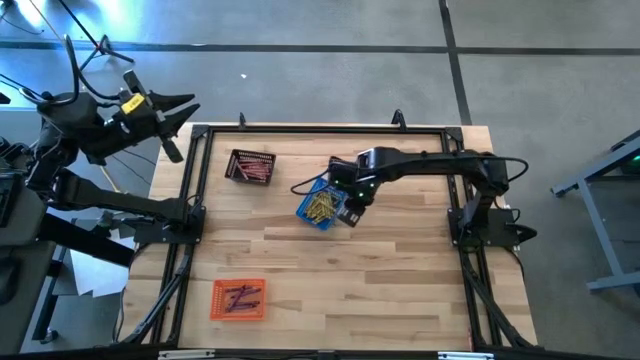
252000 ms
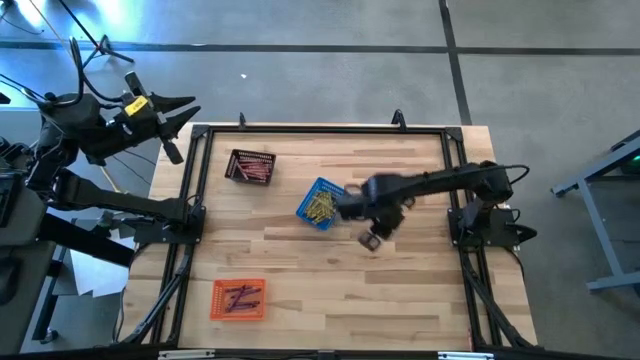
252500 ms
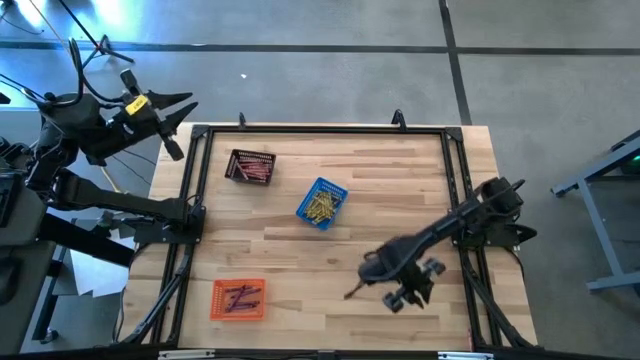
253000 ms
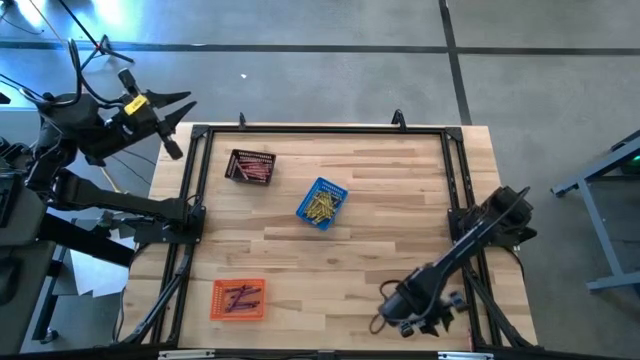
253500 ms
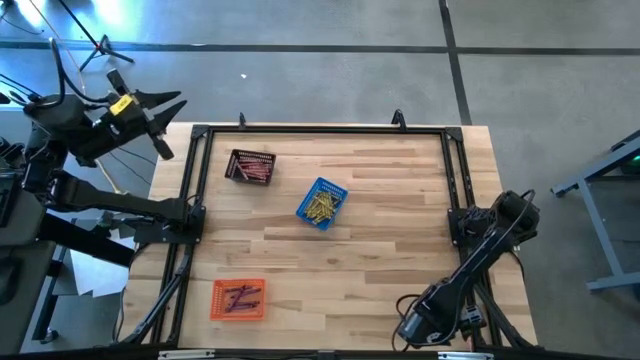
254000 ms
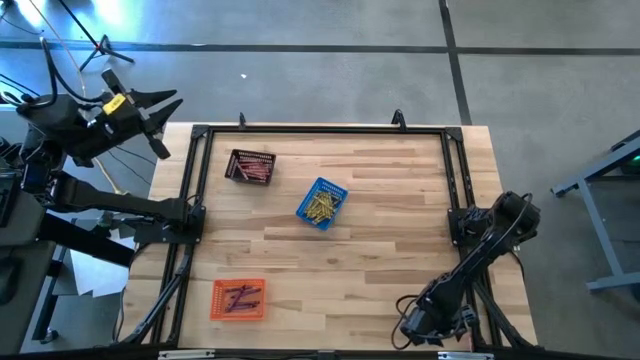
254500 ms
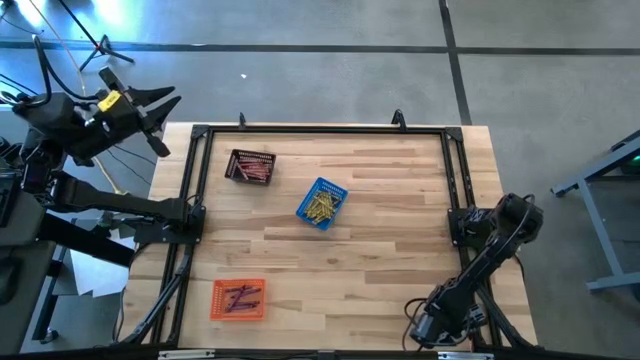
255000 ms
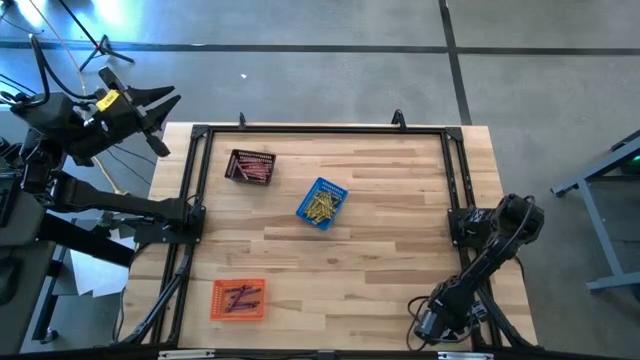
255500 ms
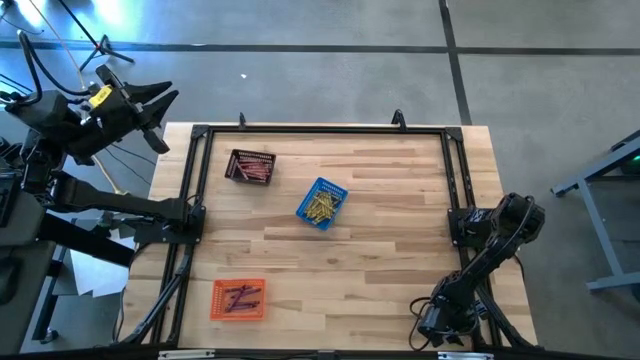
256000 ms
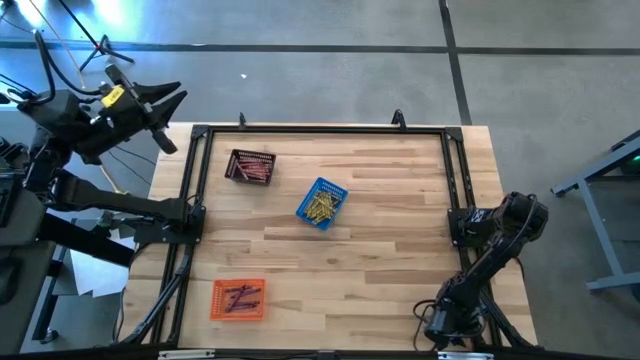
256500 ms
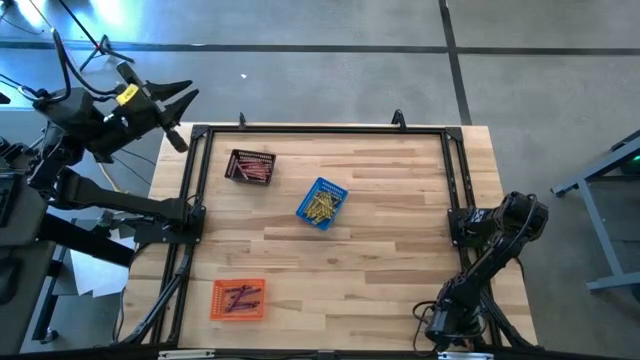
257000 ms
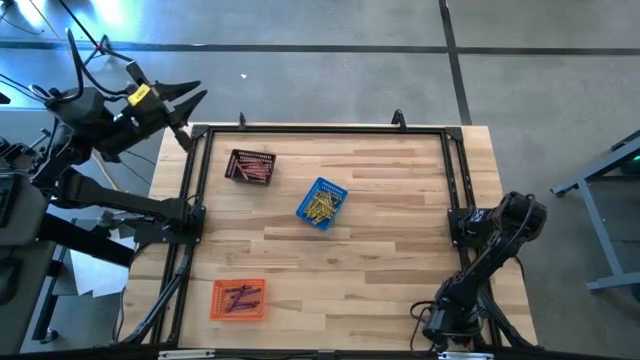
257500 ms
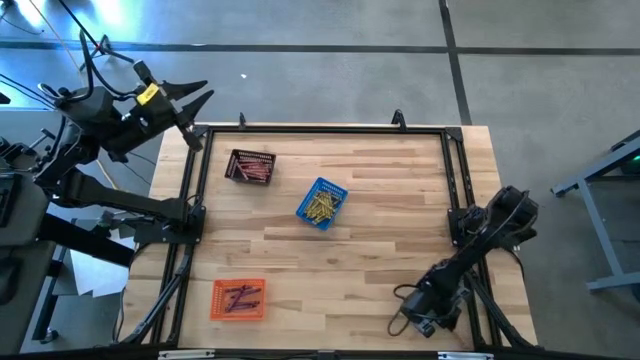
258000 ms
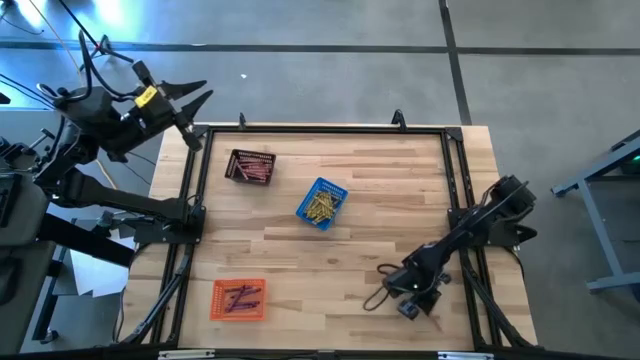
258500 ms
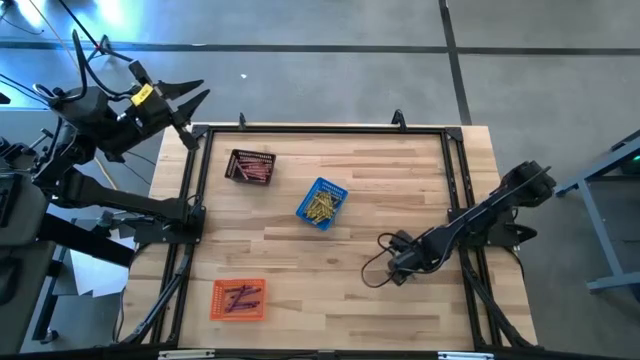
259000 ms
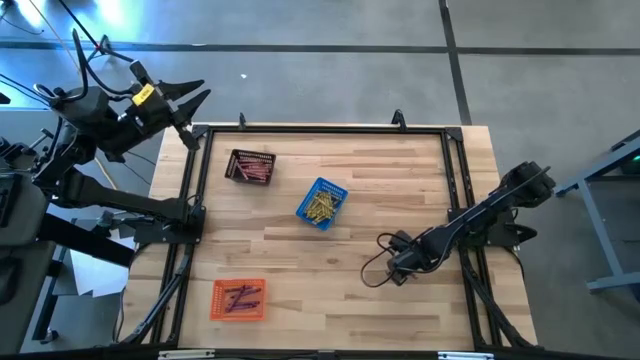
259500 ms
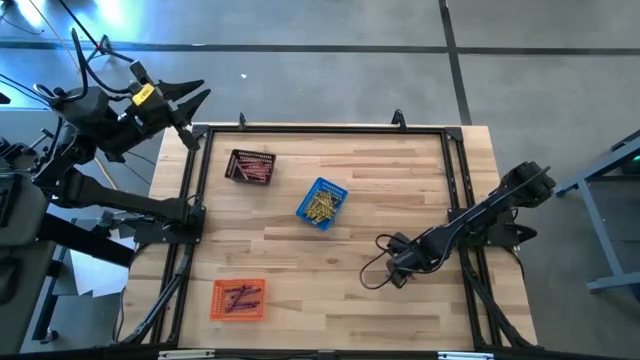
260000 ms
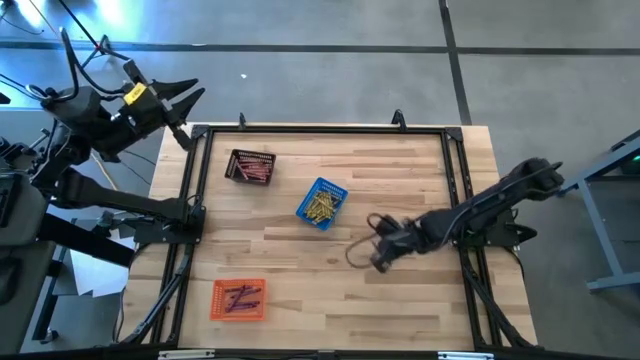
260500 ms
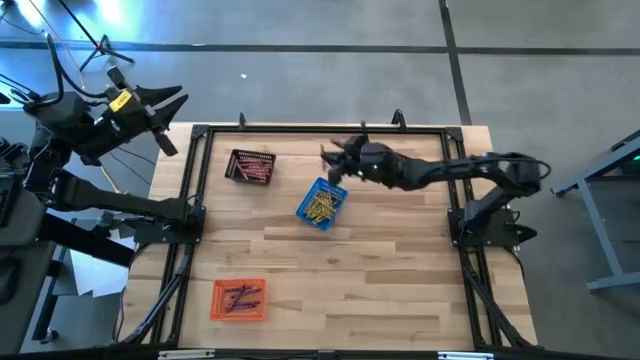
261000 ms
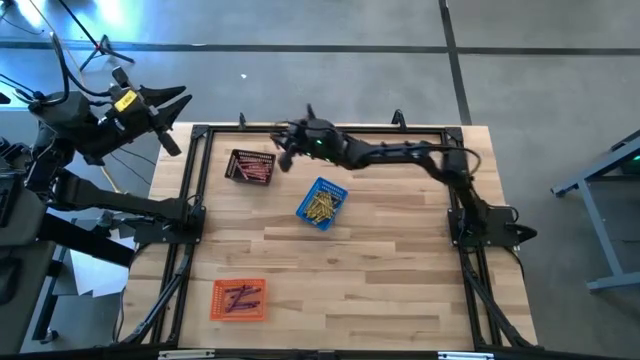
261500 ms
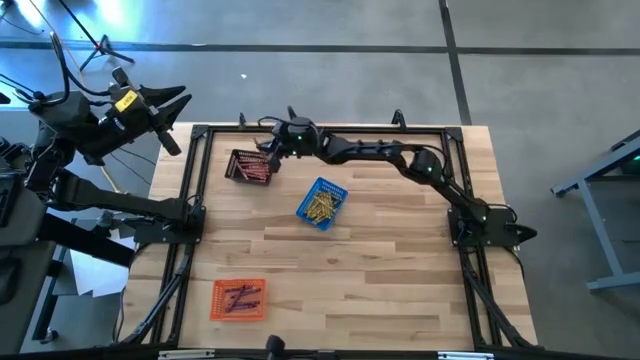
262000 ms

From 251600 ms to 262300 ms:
Task: Sort crayons
Put the red crayon into the black basket

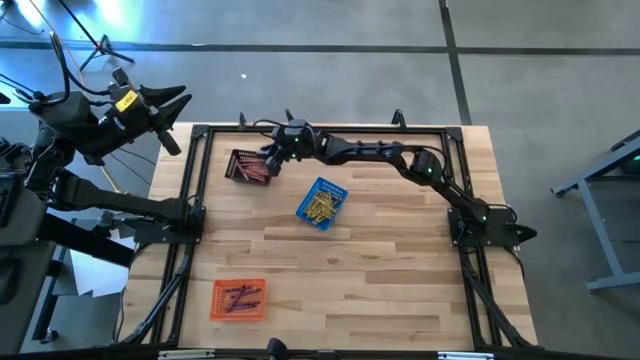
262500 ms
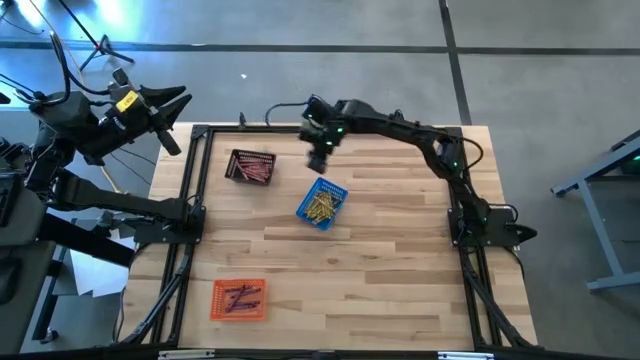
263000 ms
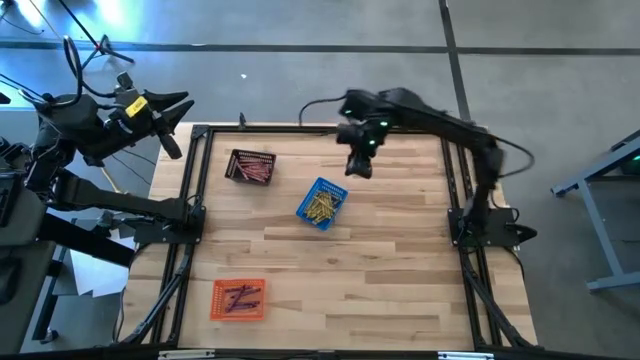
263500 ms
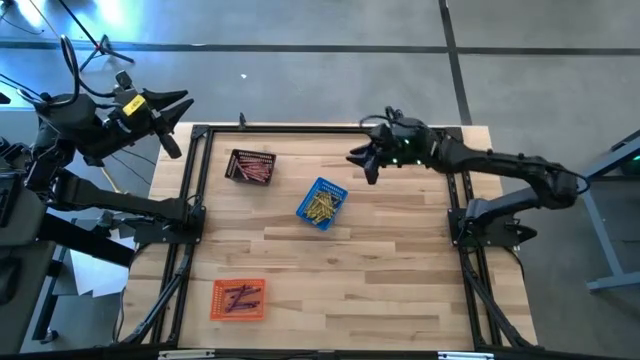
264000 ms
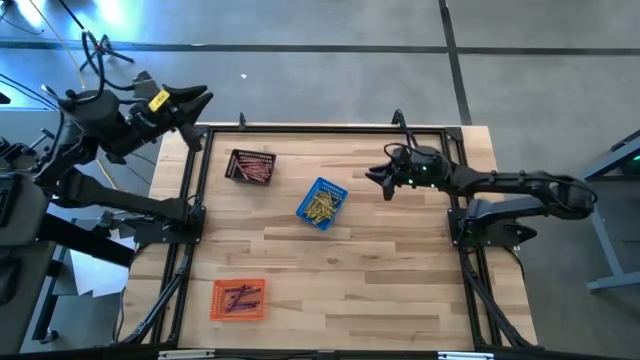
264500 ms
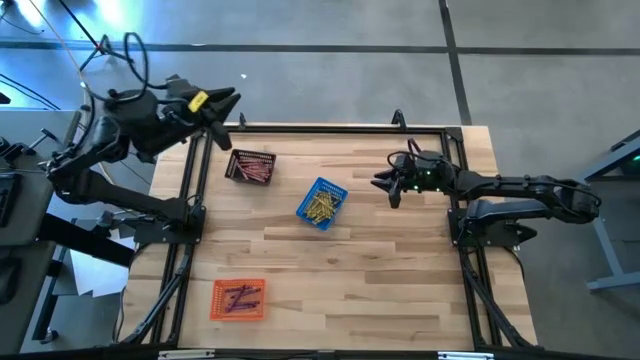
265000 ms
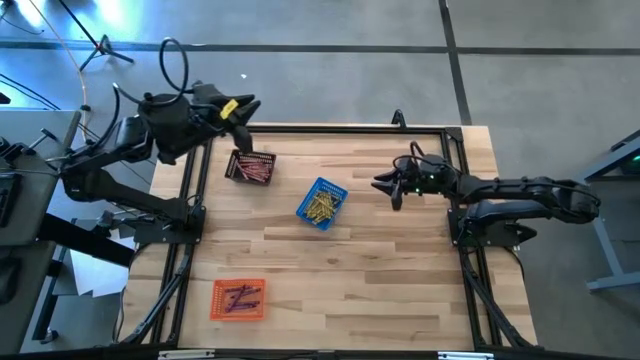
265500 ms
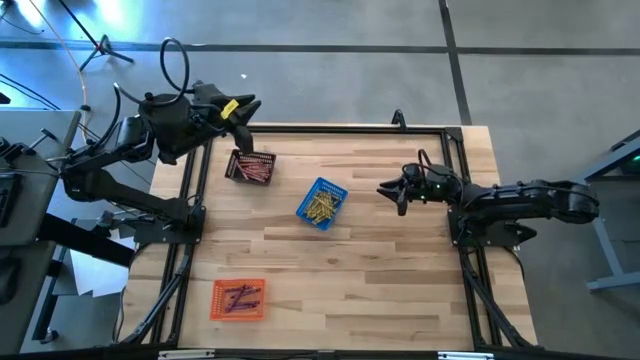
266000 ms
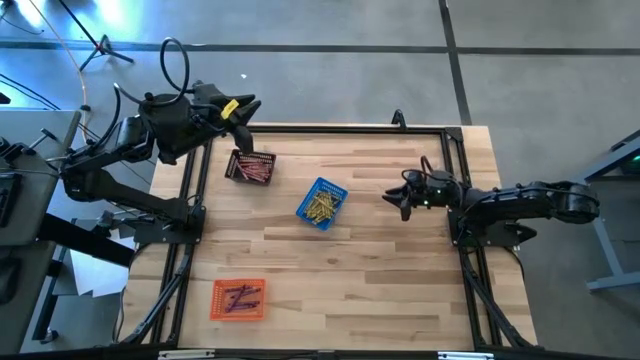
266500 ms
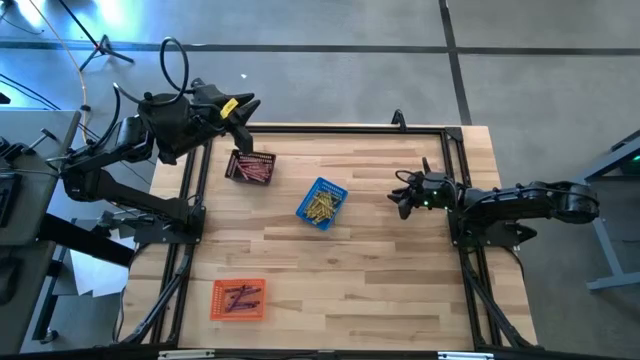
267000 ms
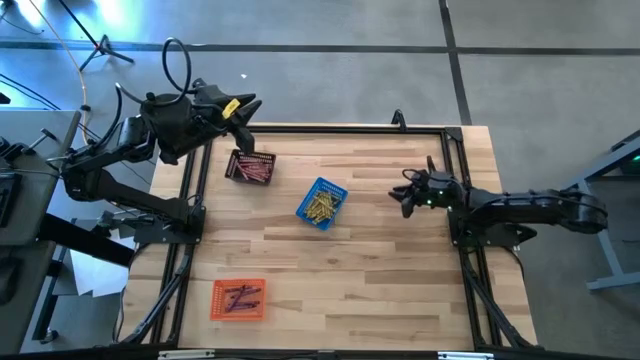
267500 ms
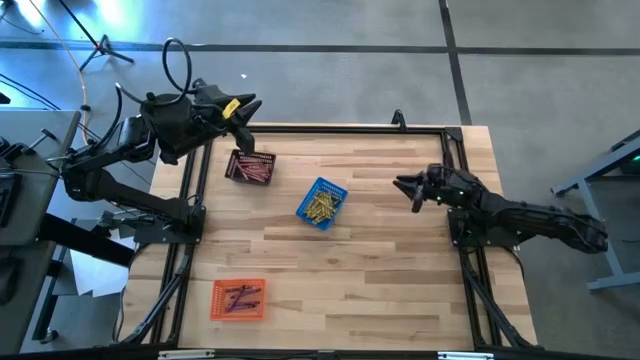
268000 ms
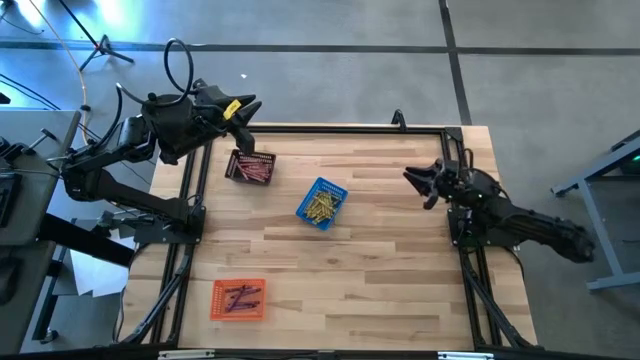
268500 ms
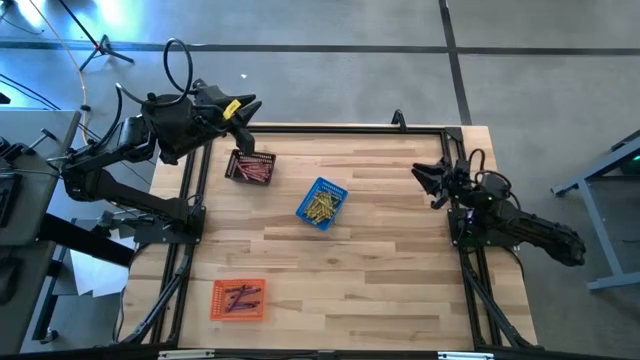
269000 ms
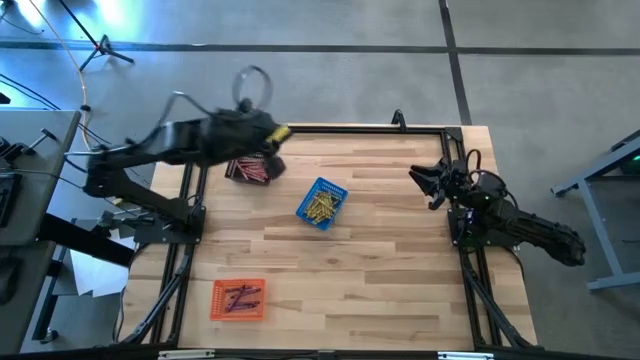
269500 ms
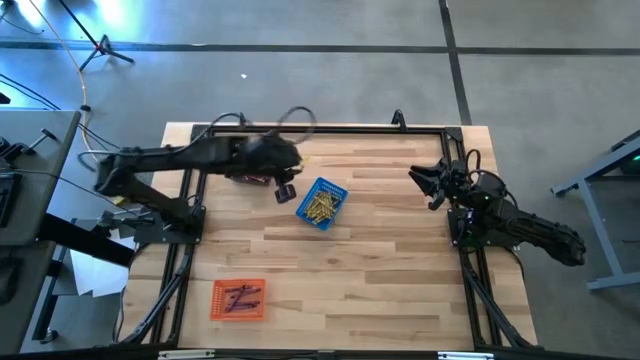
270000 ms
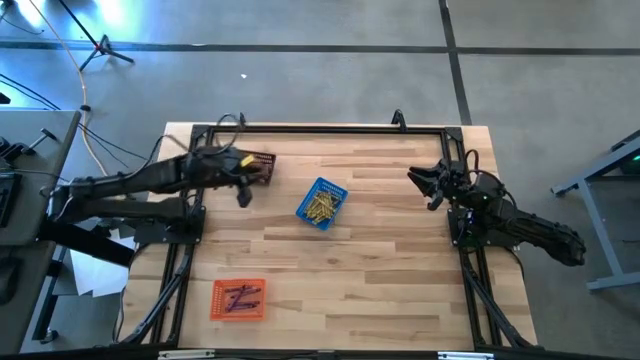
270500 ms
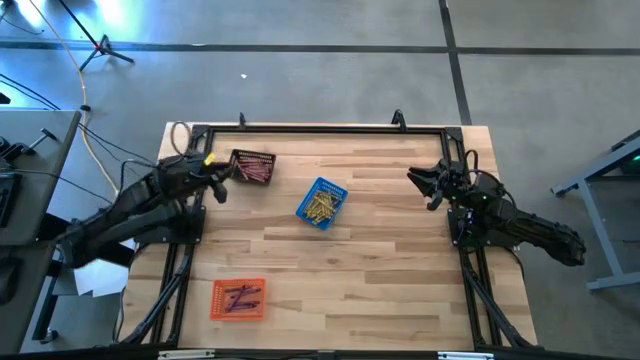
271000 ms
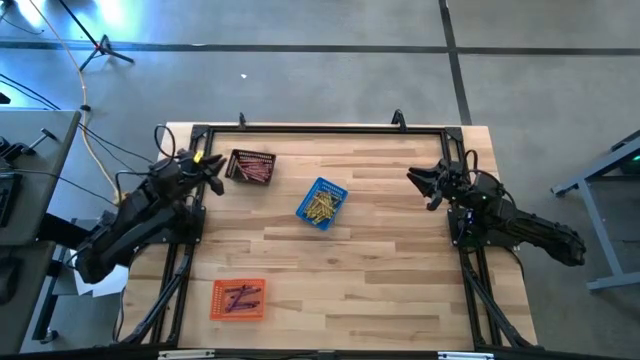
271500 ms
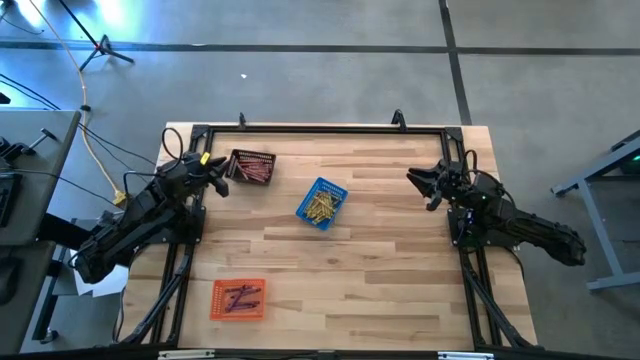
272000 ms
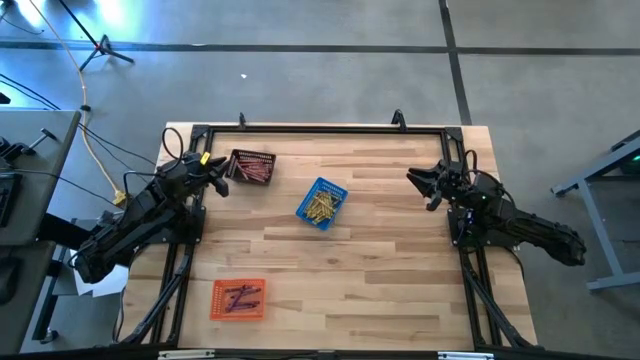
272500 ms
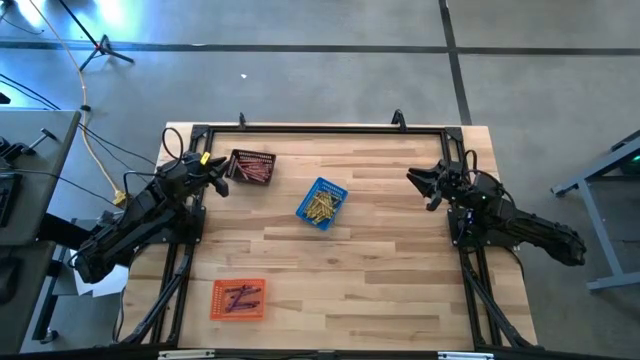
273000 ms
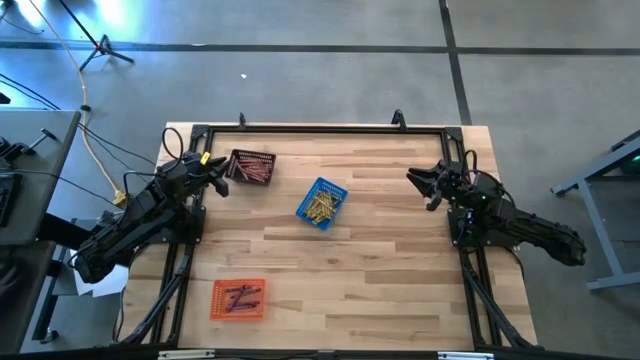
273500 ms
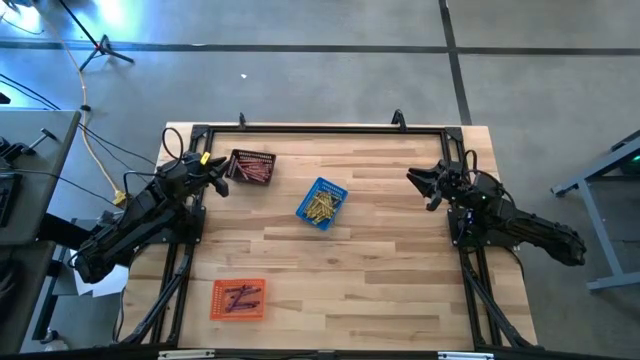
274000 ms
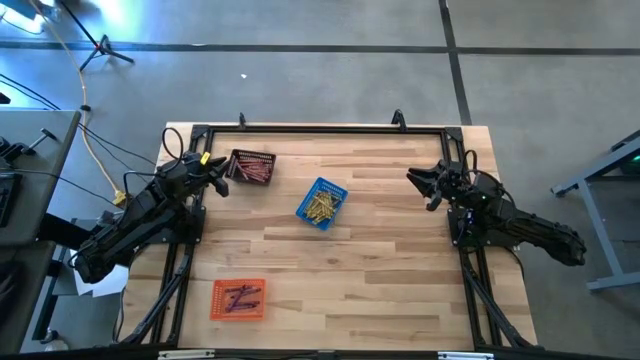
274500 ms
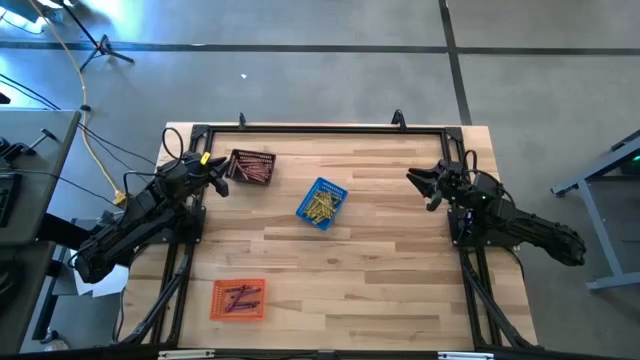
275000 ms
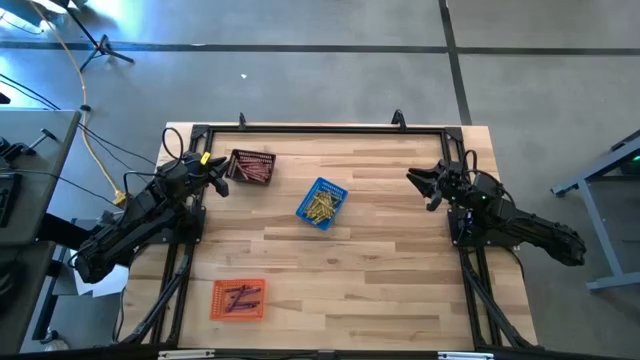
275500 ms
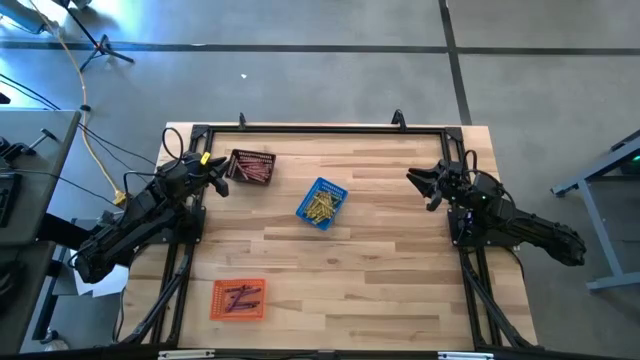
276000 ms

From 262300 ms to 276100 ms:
Return to Home Position
